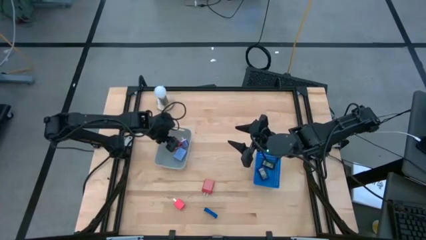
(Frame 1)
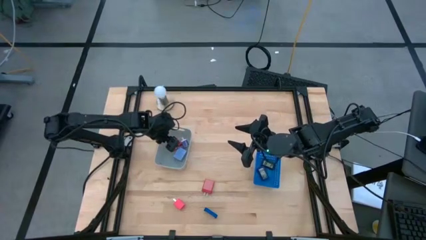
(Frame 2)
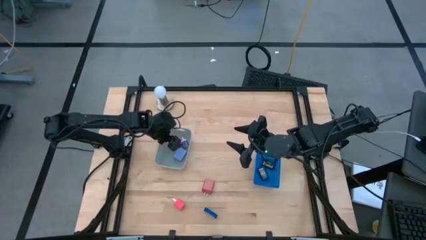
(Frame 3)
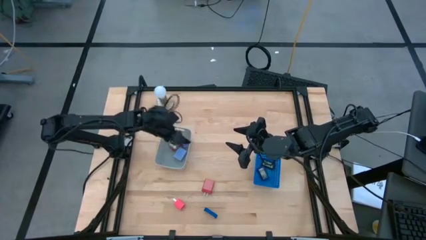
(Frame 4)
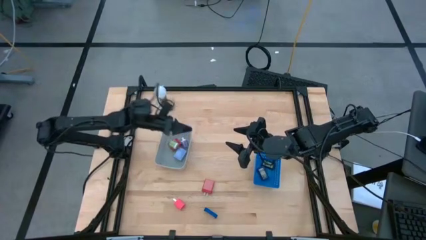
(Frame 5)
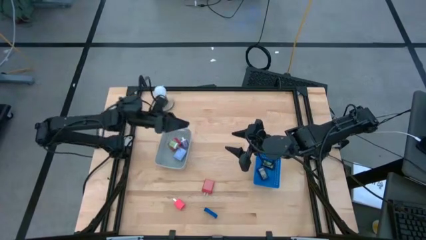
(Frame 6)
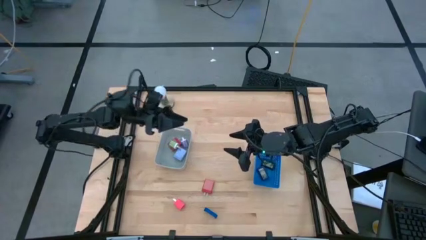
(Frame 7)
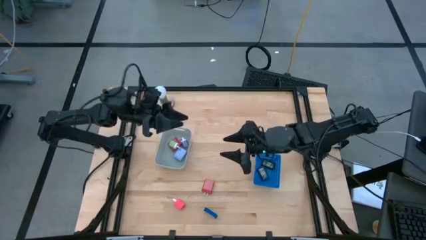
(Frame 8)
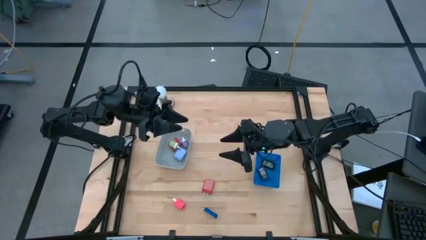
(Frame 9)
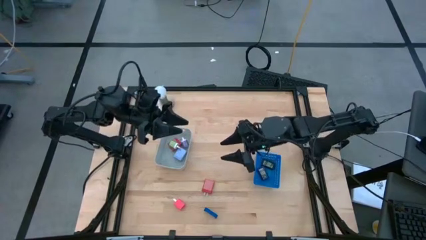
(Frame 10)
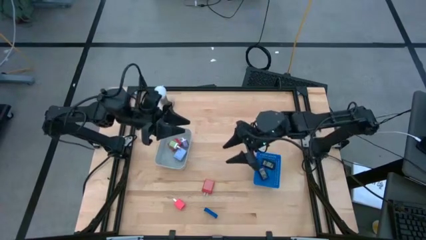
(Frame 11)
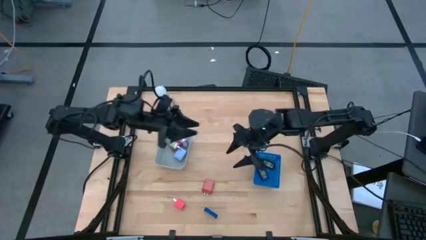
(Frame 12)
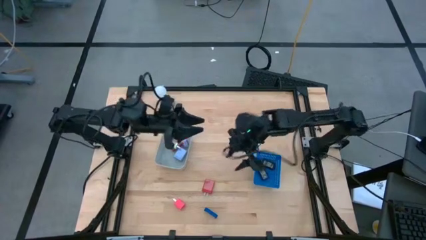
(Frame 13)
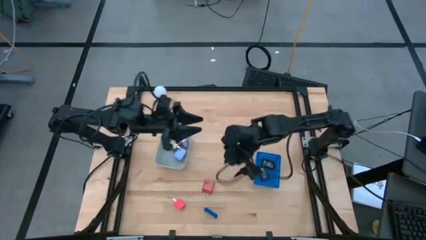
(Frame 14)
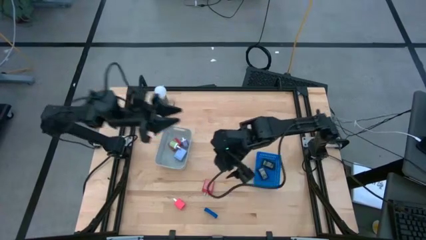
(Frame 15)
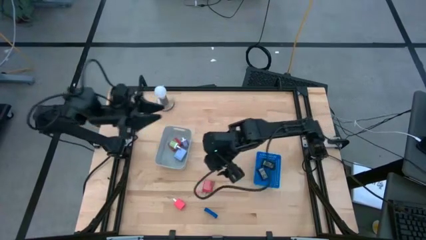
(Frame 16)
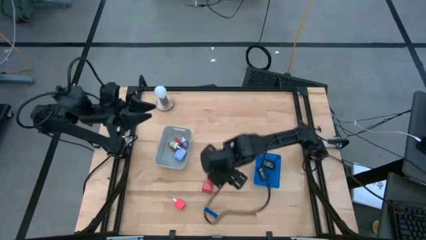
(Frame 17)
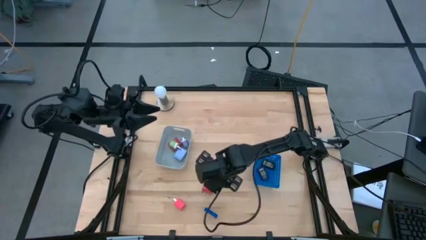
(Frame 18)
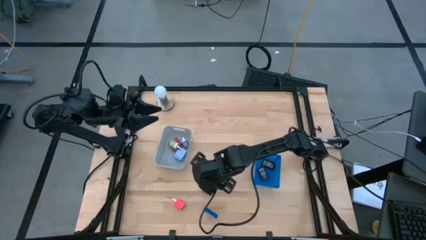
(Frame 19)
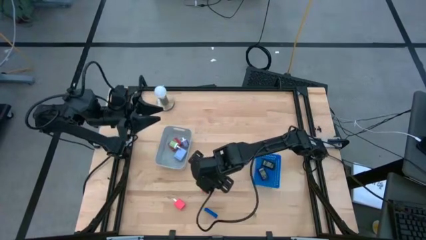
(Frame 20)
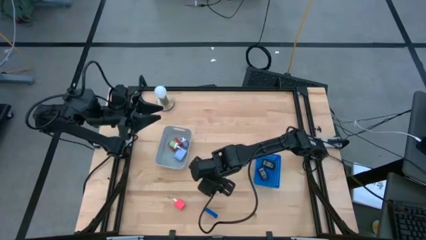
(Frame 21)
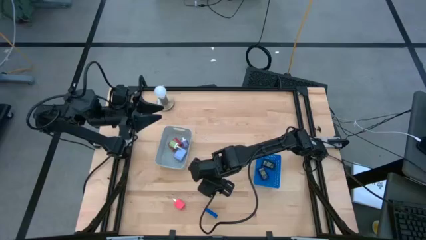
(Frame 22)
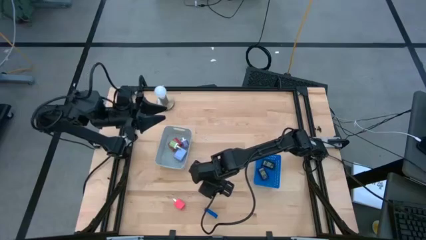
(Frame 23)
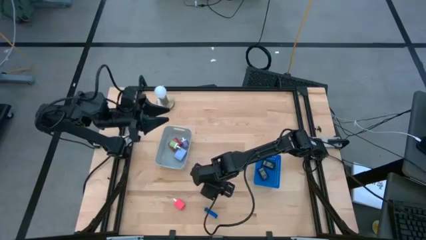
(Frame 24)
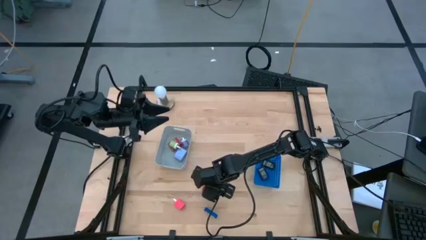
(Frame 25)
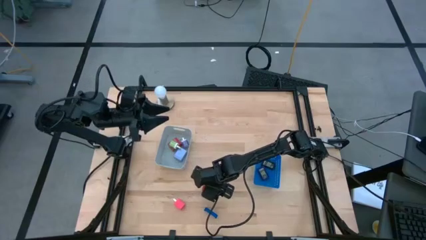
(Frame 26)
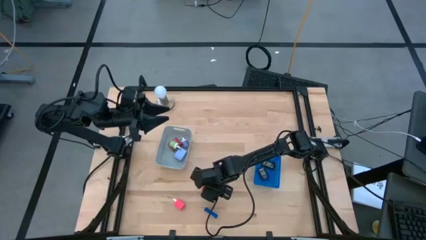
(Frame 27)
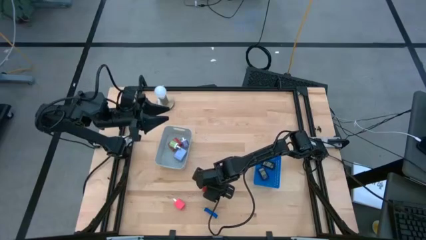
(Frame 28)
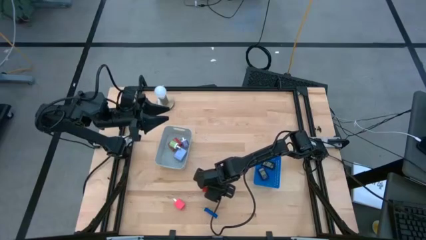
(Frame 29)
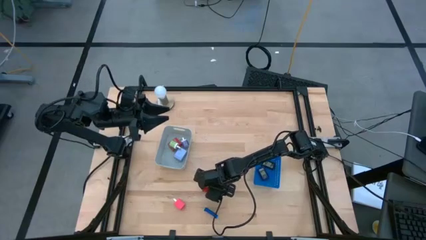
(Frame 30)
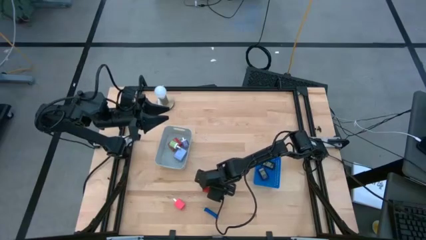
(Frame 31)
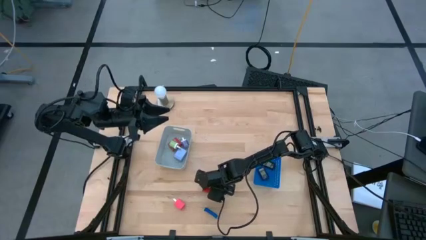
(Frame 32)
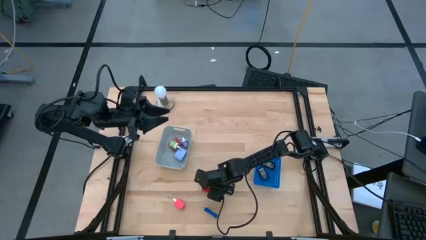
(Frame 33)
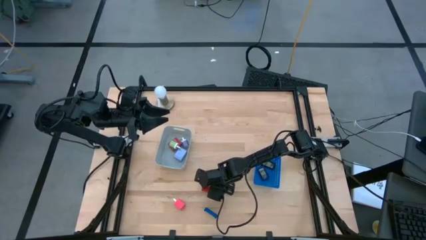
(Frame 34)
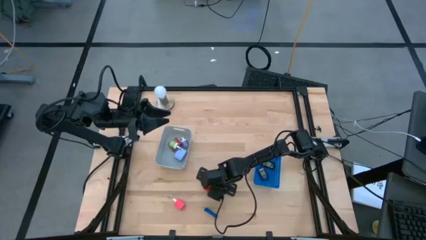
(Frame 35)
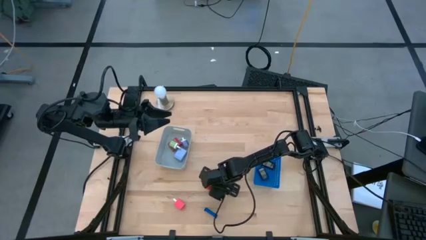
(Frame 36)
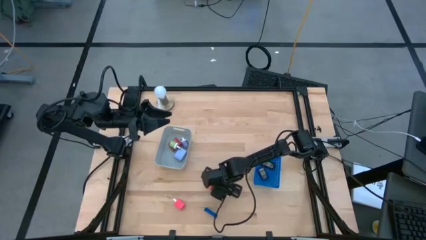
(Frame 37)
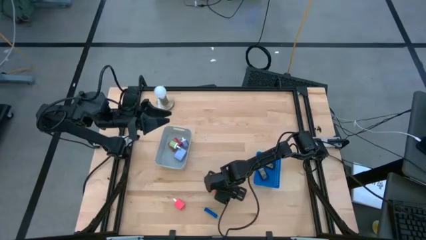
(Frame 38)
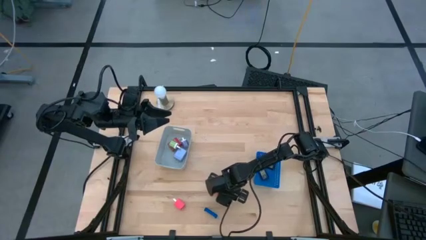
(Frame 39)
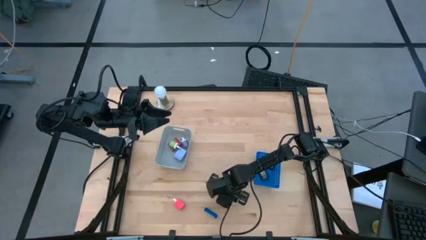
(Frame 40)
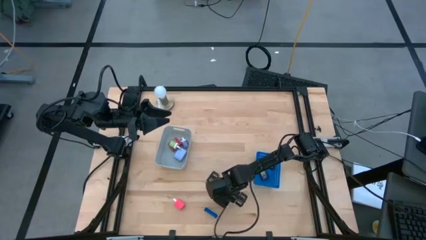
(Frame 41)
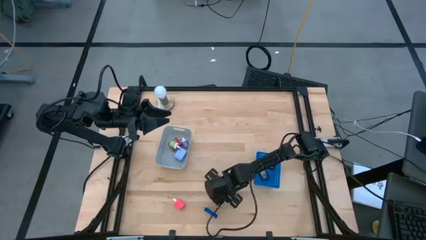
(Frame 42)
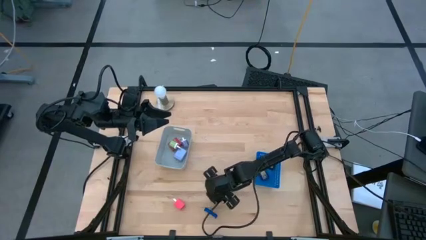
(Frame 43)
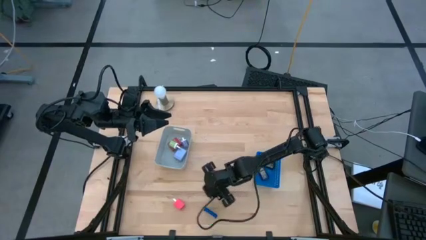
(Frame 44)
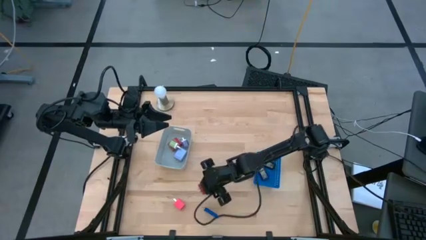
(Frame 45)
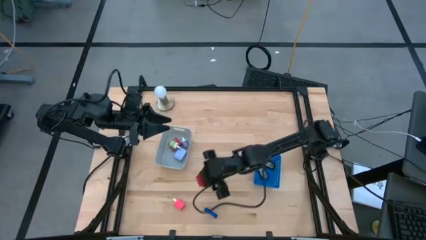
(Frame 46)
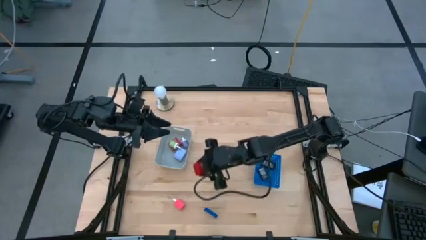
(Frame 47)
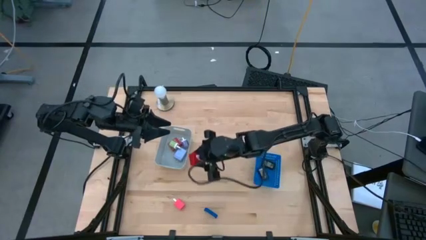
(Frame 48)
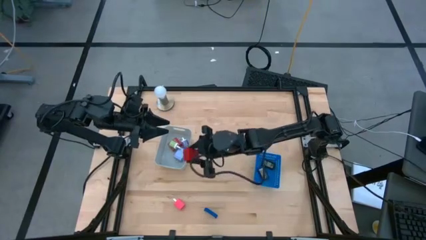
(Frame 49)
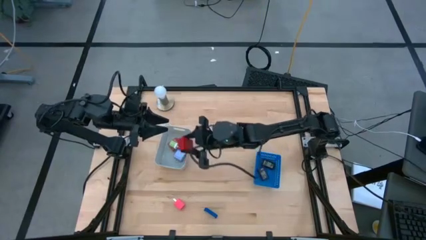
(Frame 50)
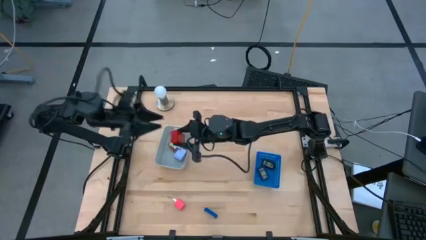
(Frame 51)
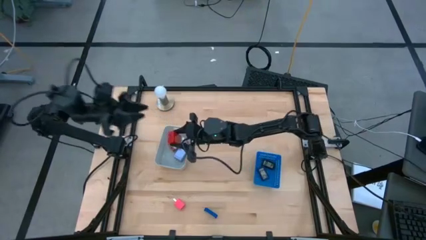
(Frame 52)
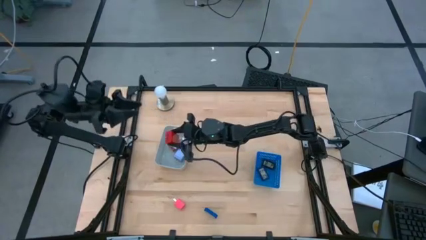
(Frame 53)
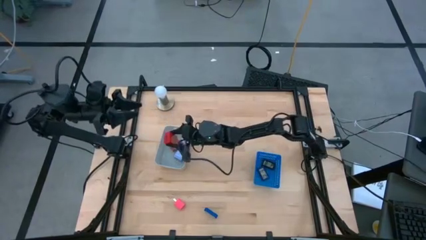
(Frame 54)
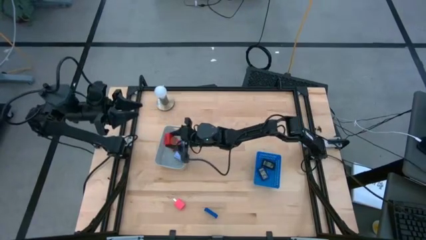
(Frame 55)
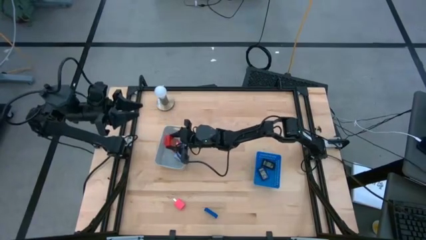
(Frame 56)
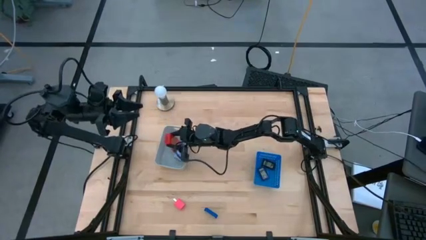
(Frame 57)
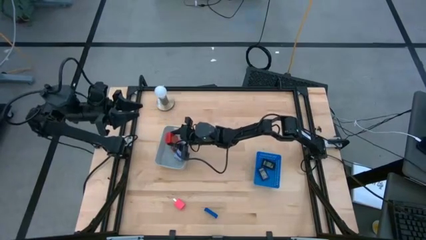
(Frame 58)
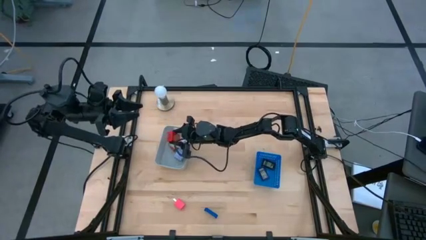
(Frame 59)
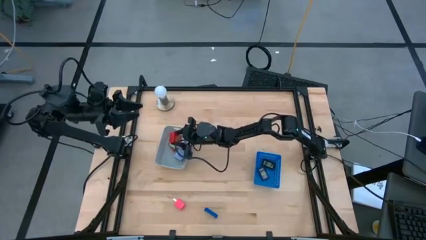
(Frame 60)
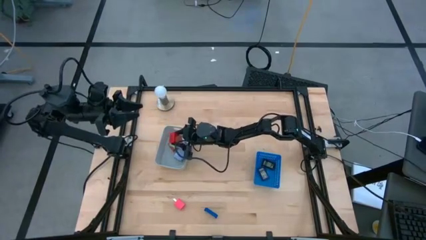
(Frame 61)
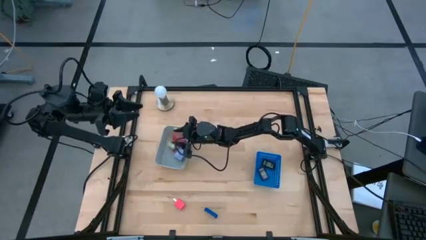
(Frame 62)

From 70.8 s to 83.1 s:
Task: Pick & Place Office items
Put the red charger adapter into the gray bin

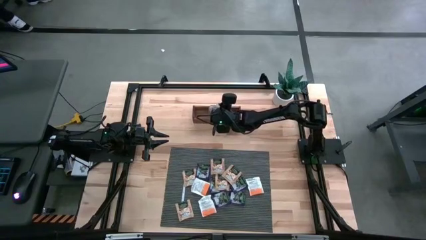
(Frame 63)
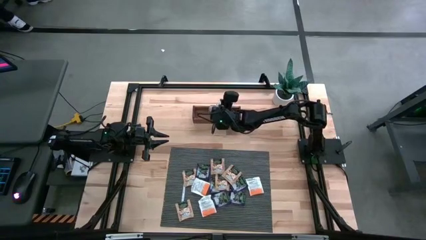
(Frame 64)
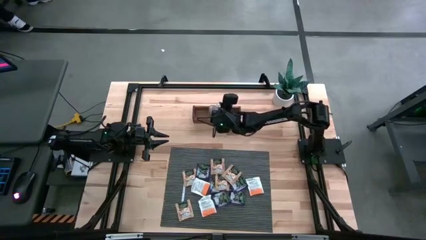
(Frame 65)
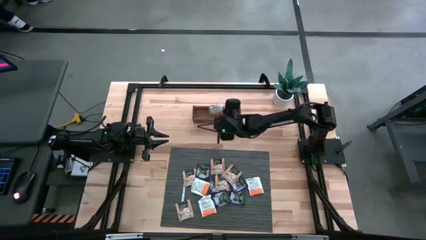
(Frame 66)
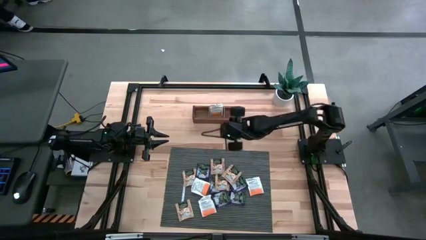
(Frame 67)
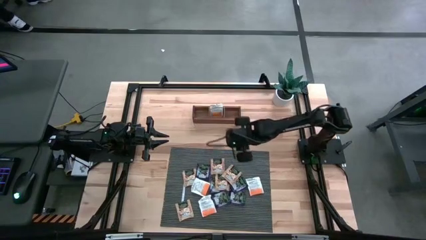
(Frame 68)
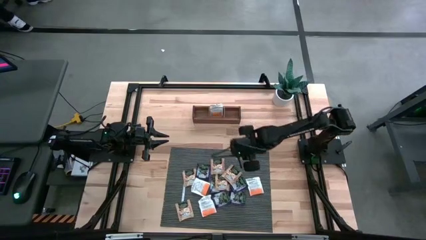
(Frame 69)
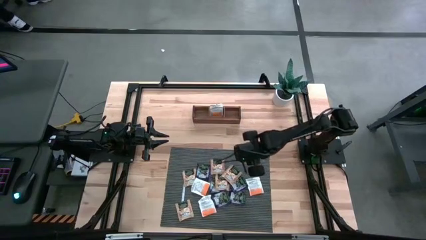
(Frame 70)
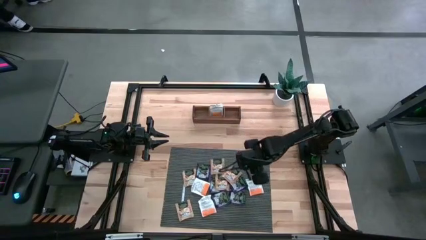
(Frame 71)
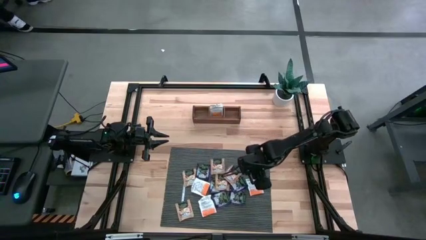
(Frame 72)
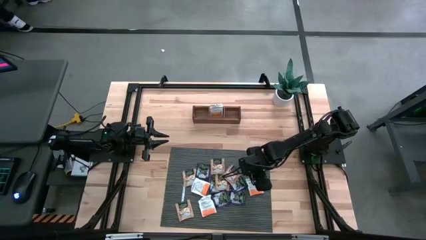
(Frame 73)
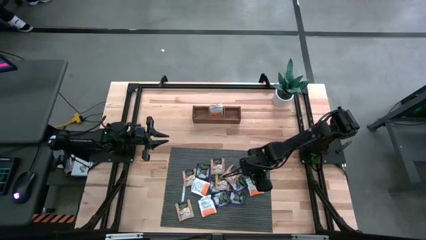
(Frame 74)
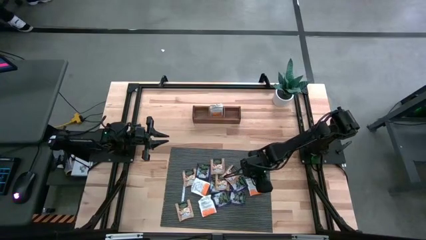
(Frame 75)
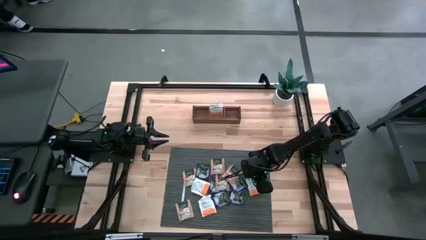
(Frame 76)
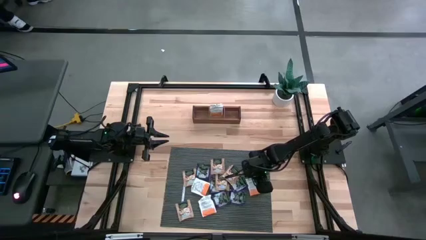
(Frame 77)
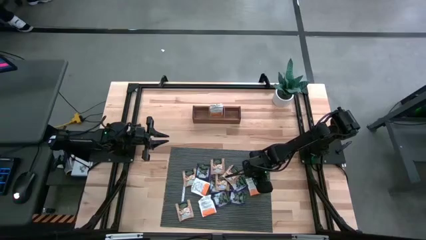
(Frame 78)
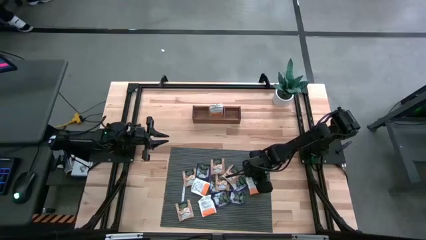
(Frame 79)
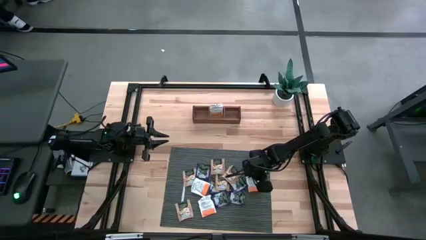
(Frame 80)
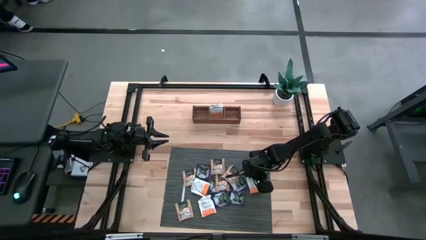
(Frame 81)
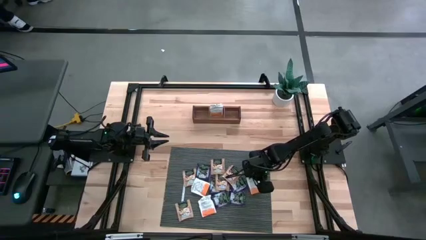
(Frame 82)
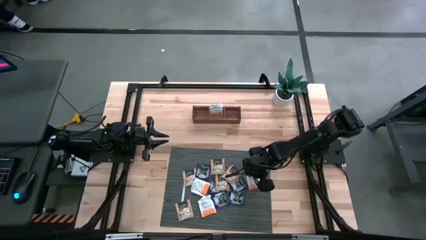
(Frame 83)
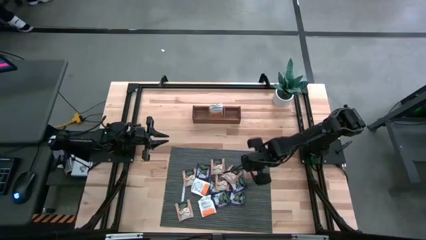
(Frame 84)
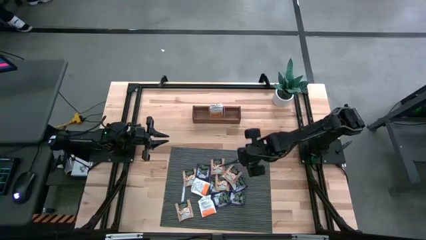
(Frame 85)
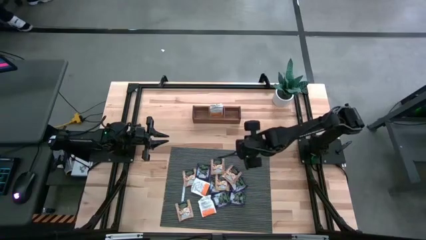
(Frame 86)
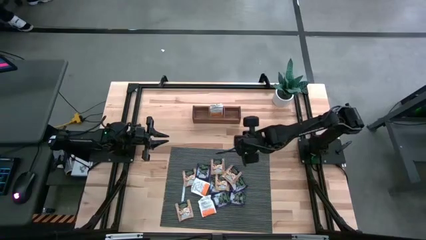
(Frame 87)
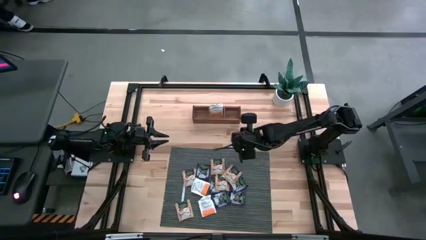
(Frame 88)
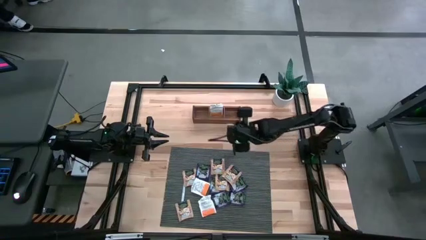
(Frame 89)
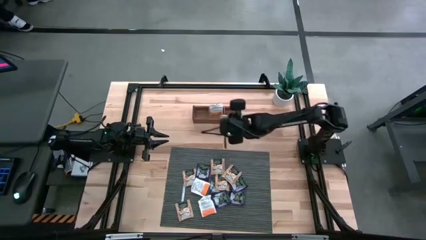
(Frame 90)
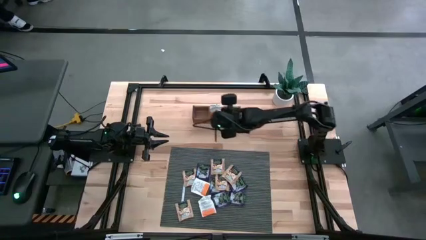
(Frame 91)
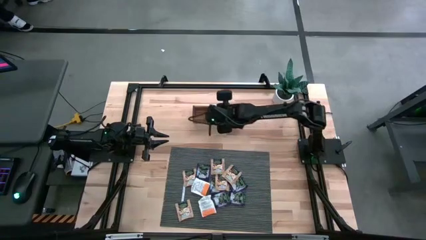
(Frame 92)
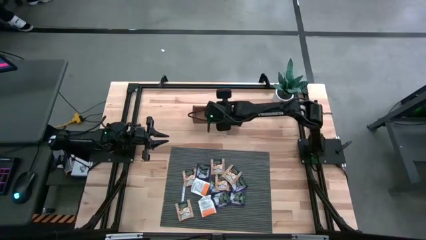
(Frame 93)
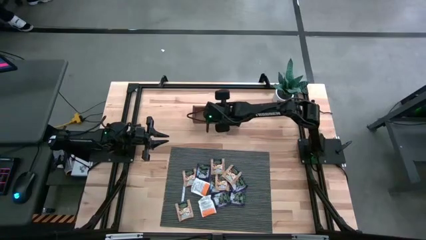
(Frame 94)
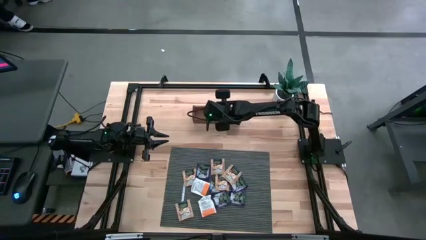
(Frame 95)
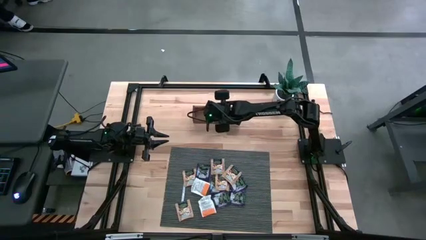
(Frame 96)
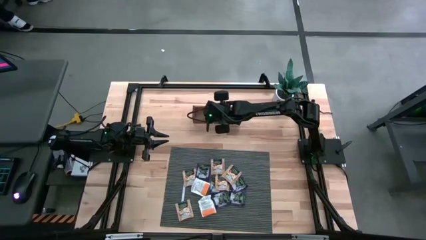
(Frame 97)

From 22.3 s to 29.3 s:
Task: Pick & Place Tea
Put the orange tea bag into the middle compartment of the wooden organizer
